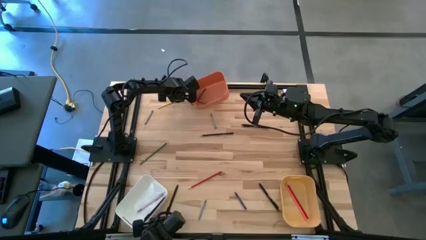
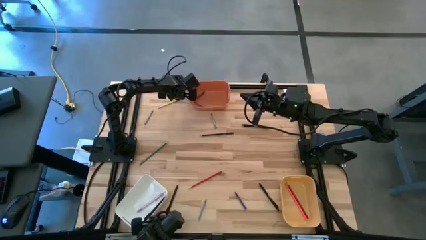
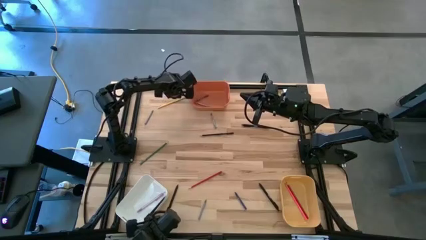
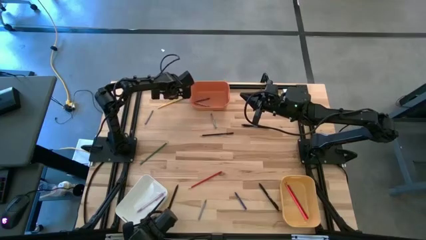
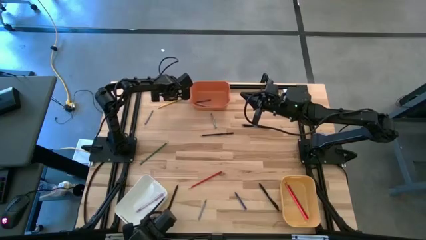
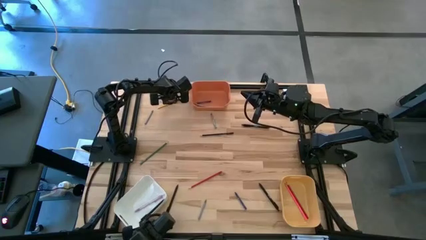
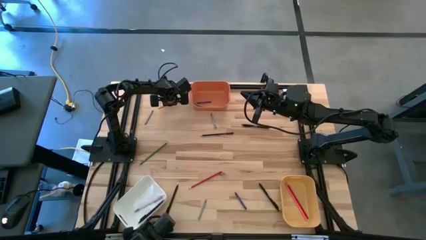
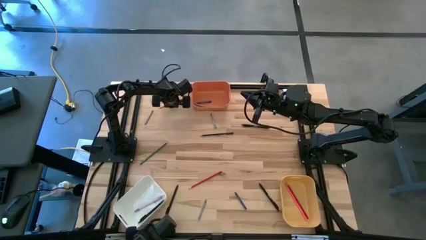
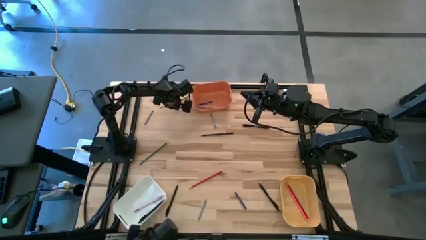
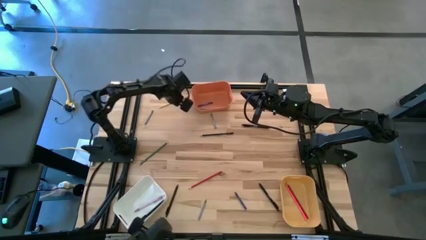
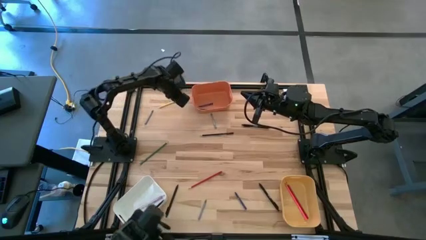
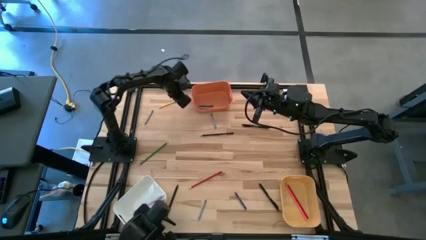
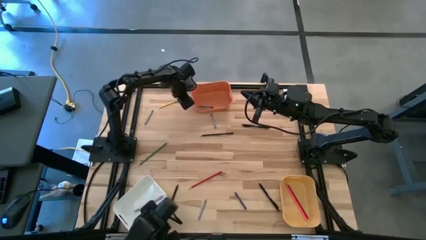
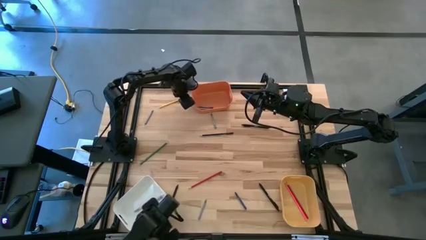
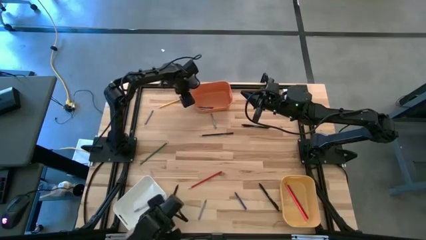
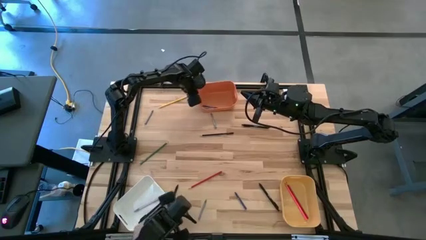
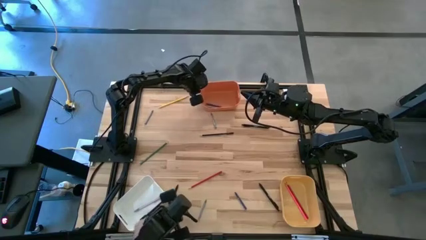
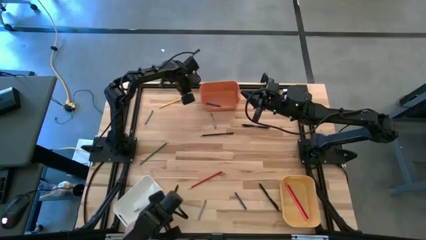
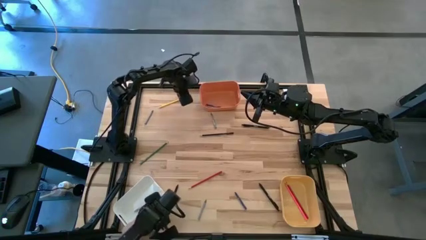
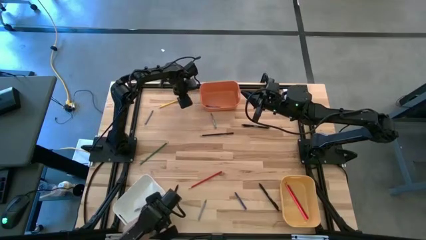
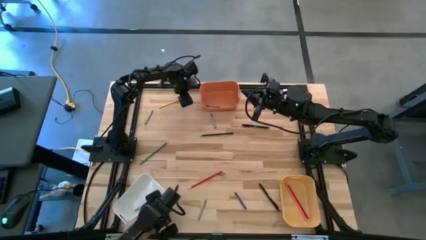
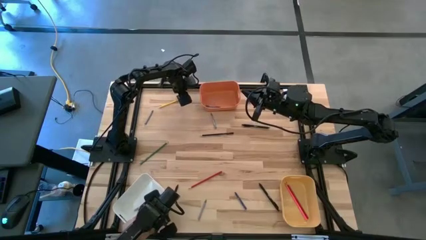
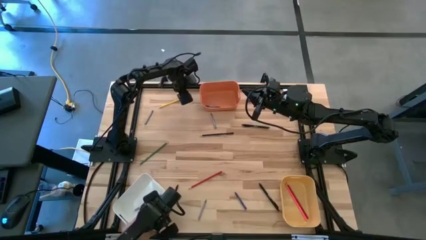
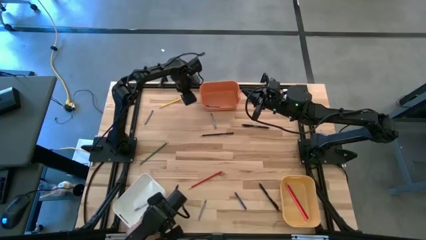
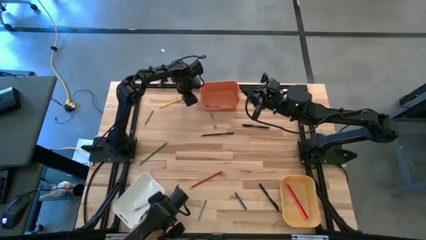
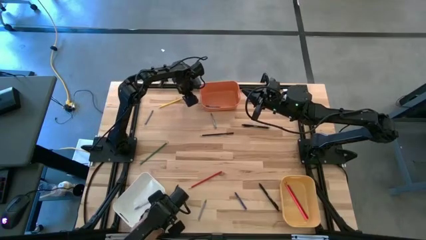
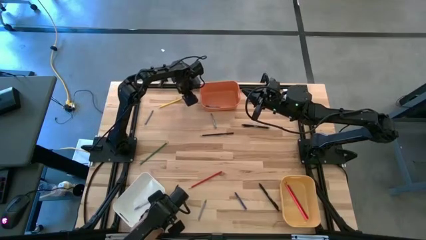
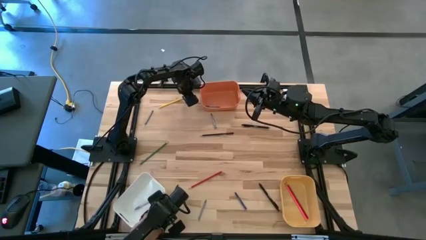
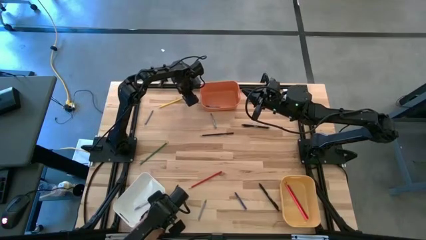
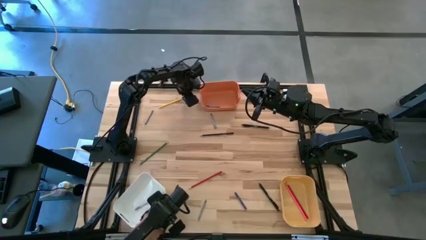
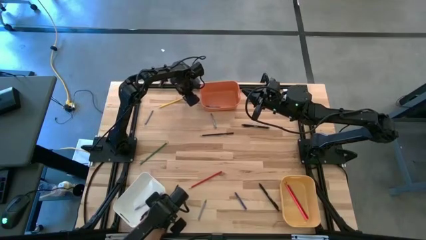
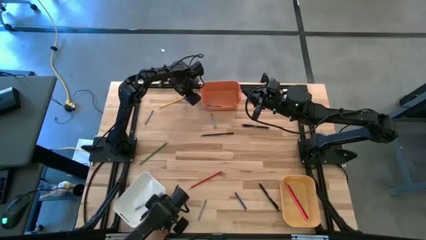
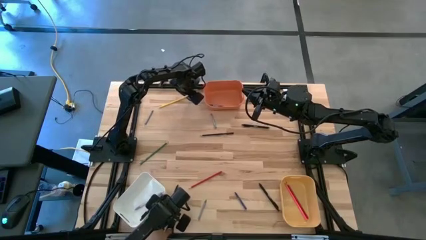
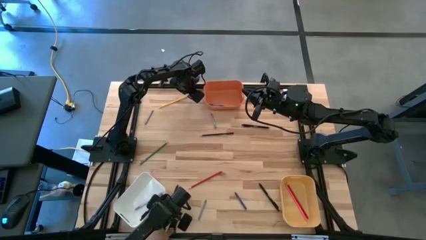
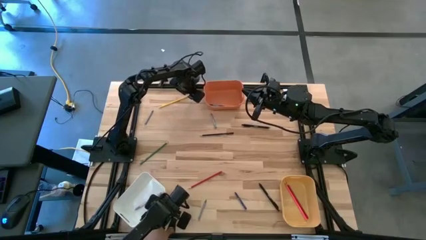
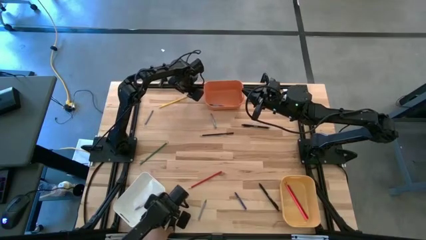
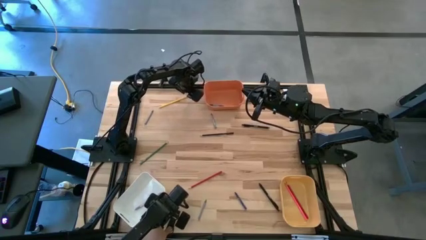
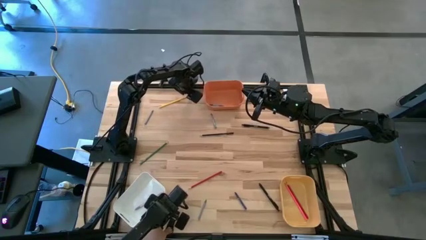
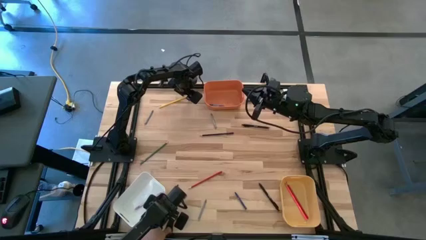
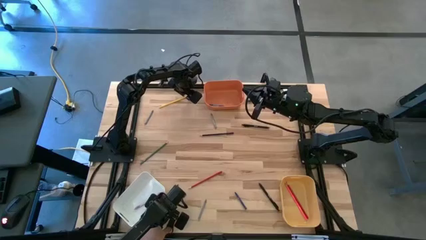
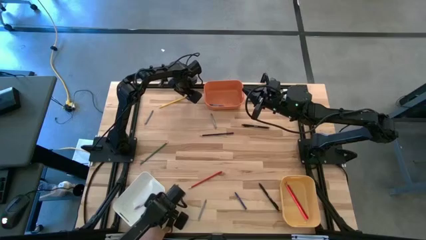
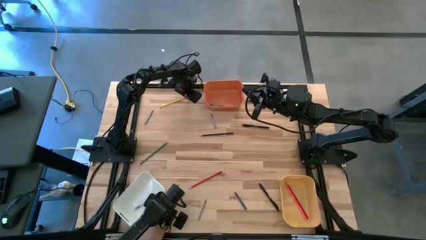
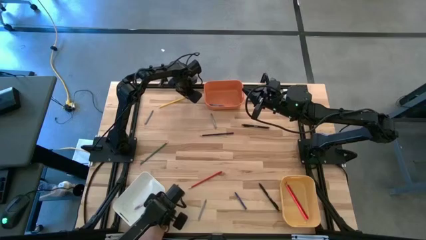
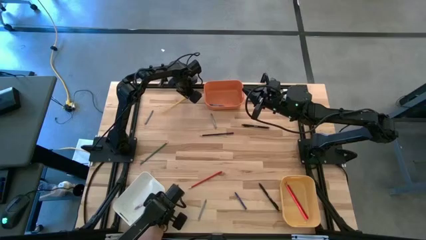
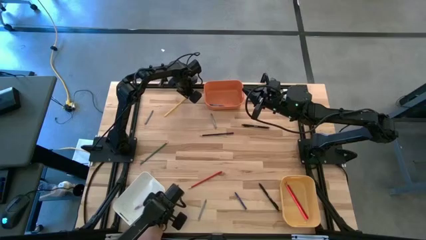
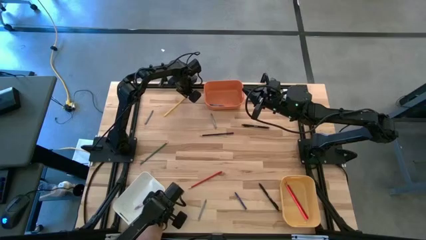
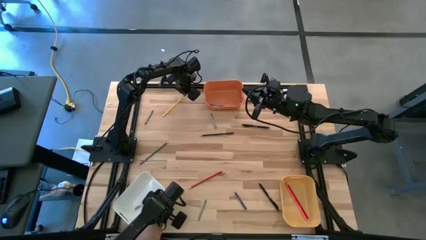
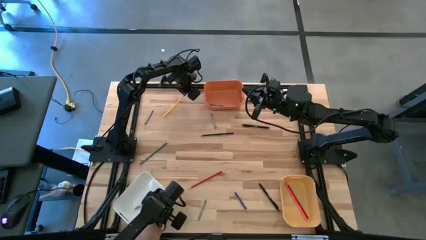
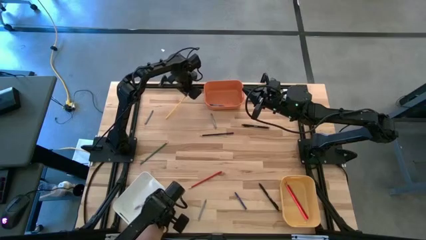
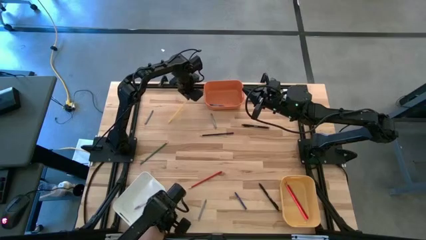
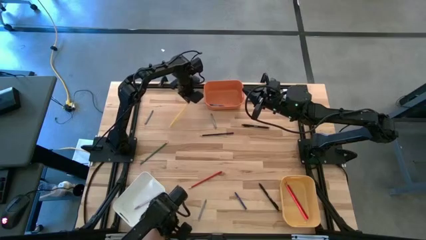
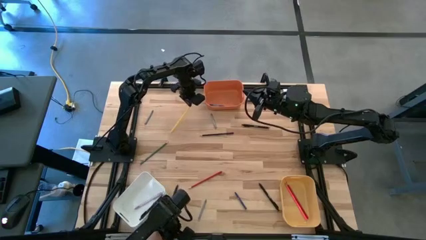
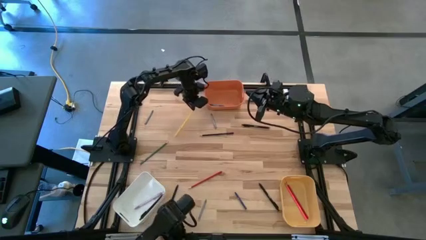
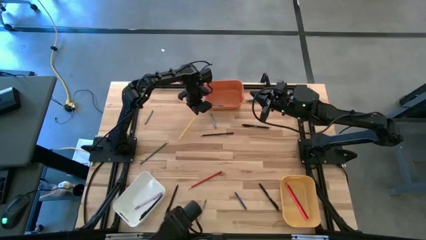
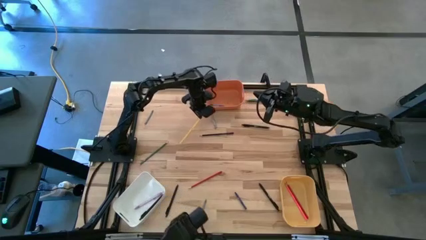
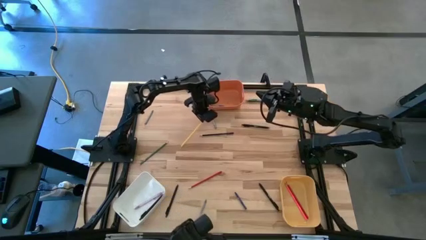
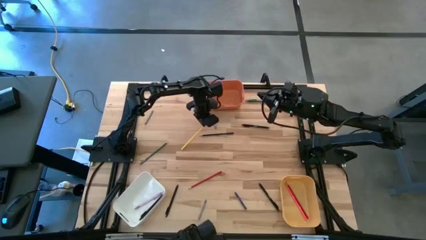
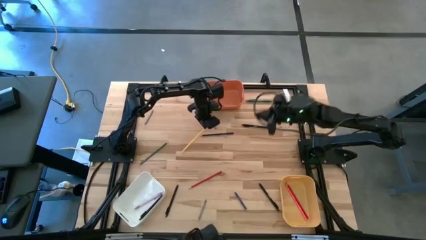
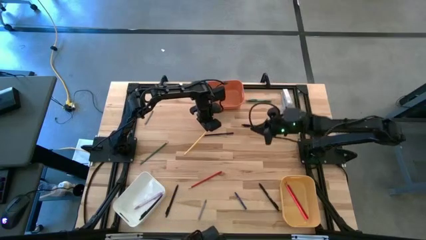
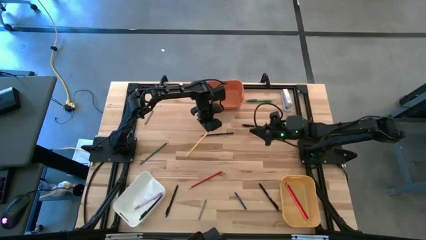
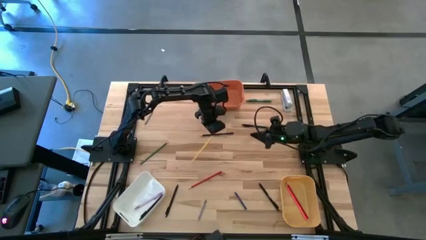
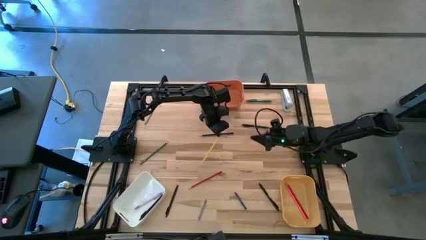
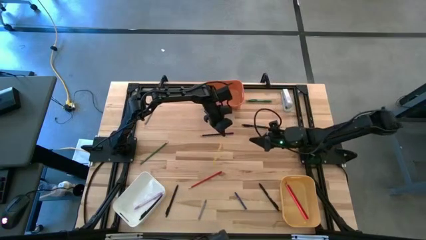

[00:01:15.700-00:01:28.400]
Task: Sort crayons/erasers/pens/pencils in bins
Put the yellow pencil into the yellow bin

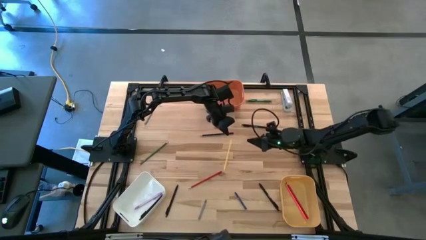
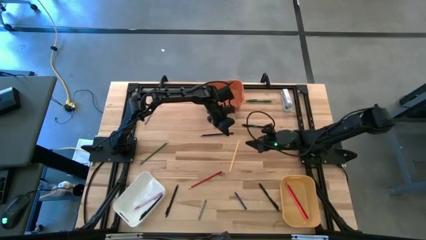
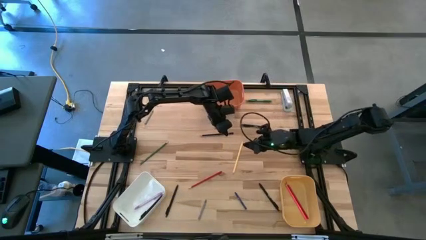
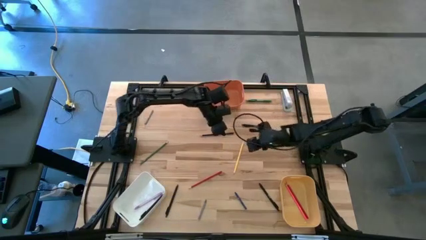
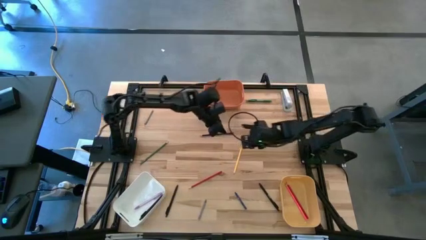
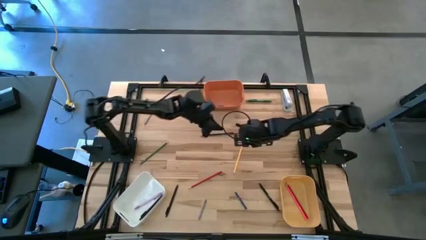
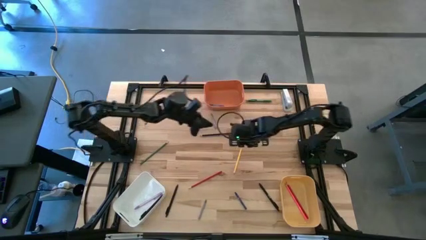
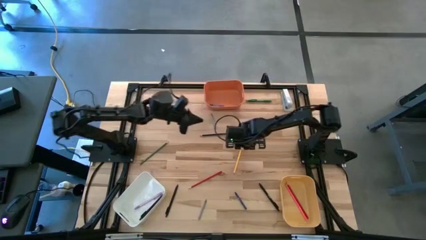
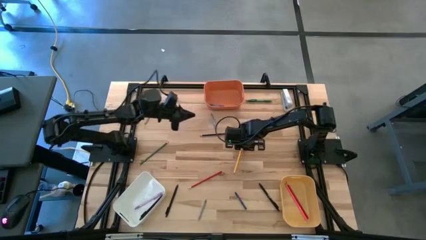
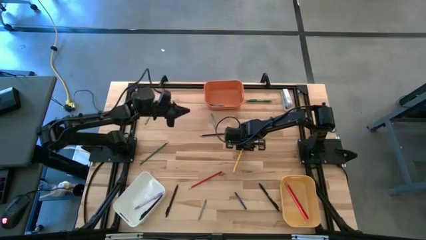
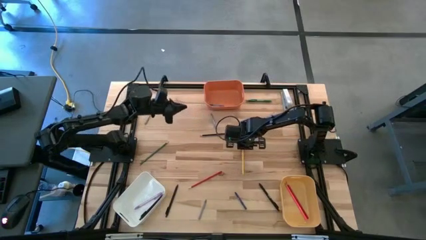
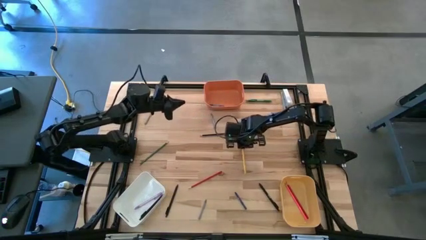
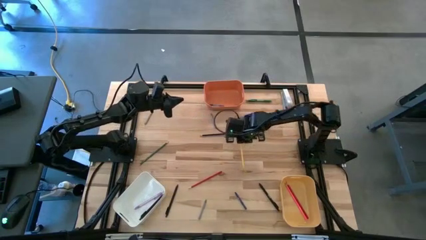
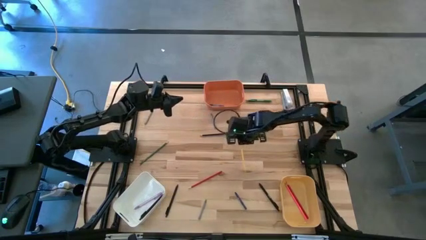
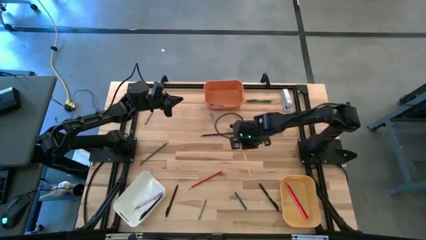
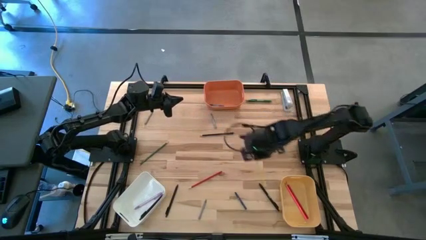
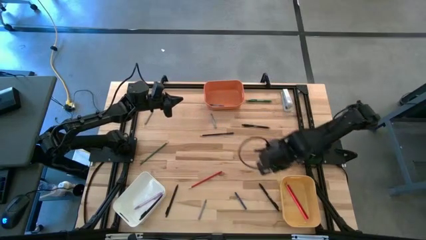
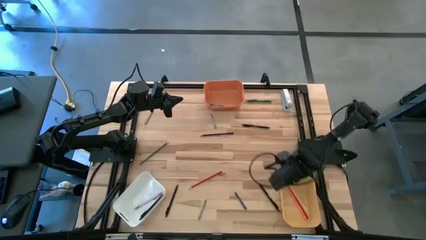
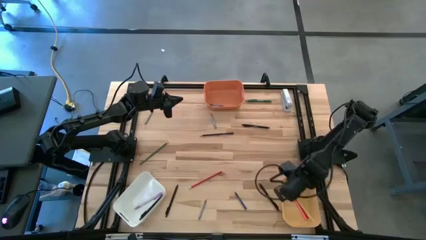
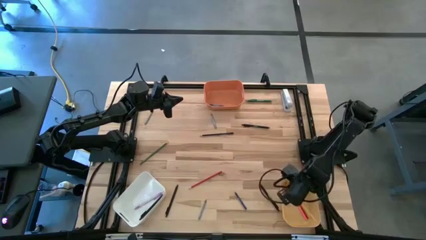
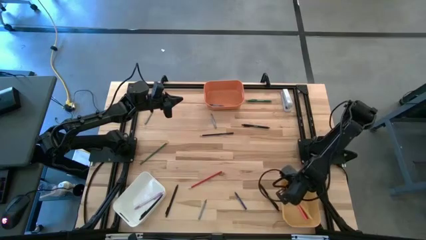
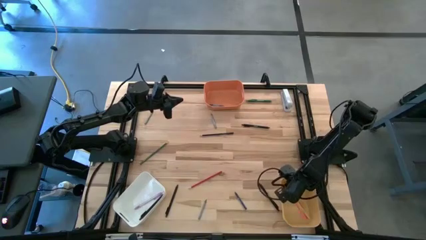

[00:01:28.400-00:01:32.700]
Put the yellow pencil into the yellow bin

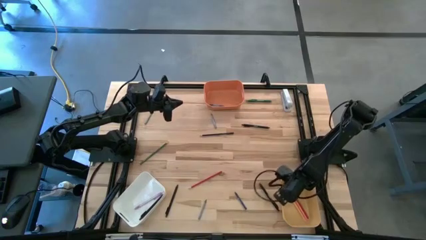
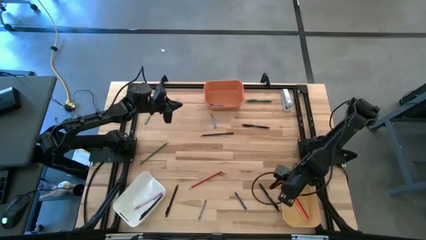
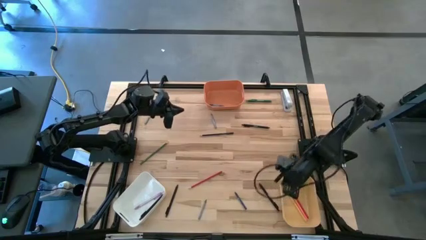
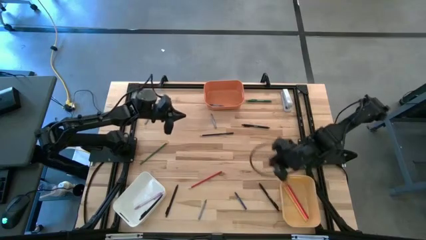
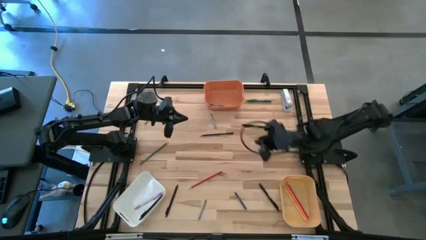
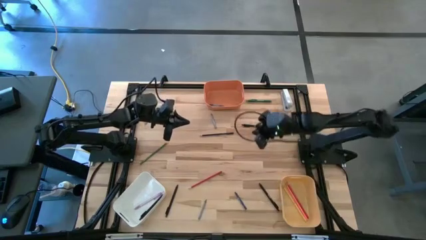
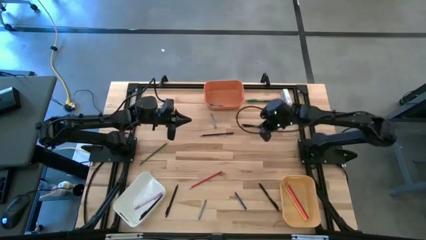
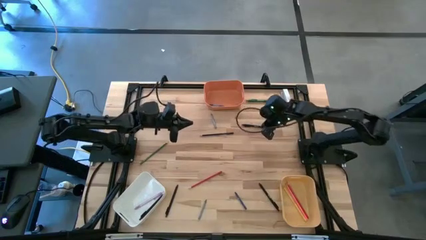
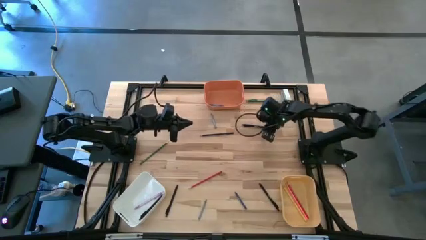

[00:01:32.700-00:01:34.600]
Put the black pen into the white bin
